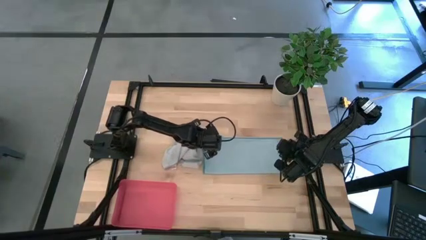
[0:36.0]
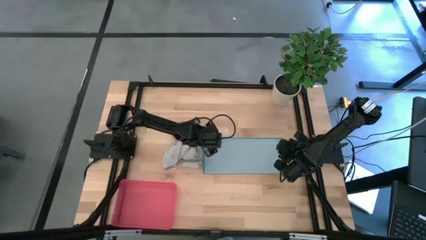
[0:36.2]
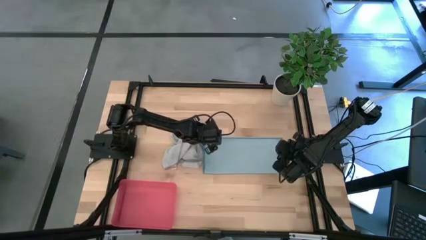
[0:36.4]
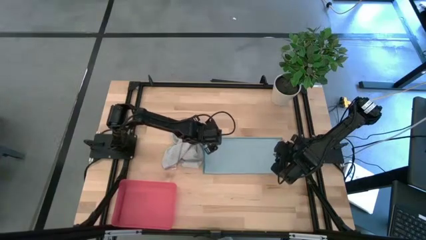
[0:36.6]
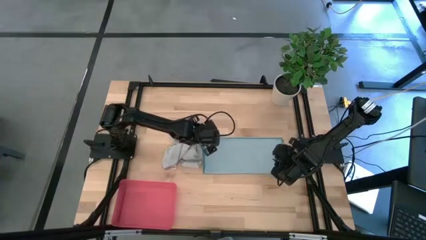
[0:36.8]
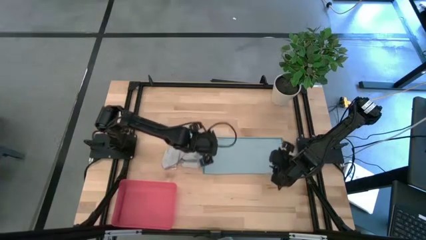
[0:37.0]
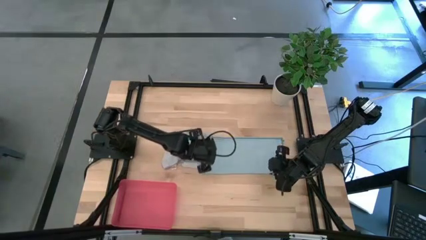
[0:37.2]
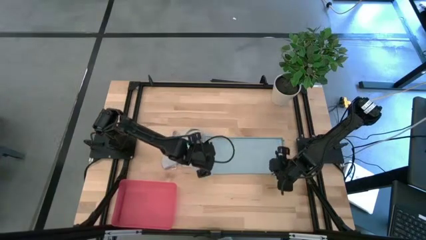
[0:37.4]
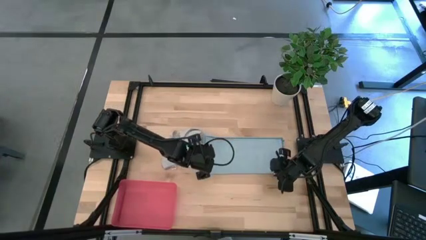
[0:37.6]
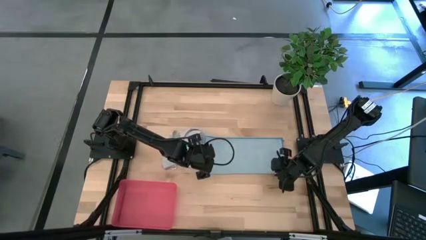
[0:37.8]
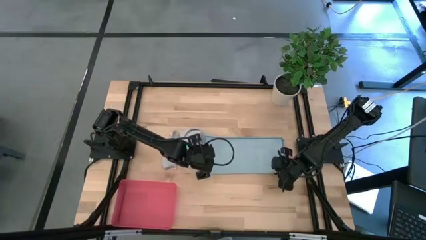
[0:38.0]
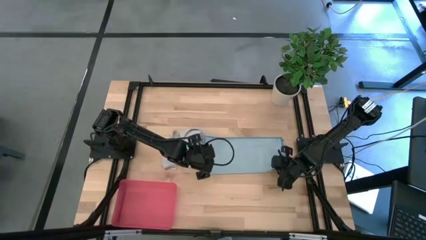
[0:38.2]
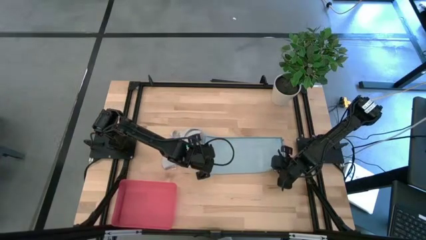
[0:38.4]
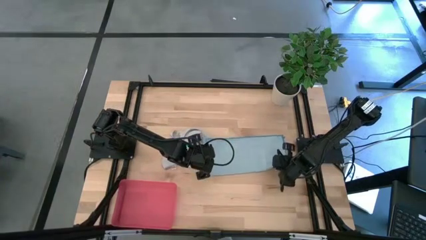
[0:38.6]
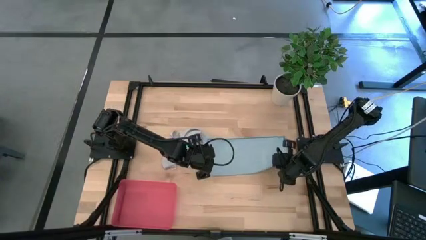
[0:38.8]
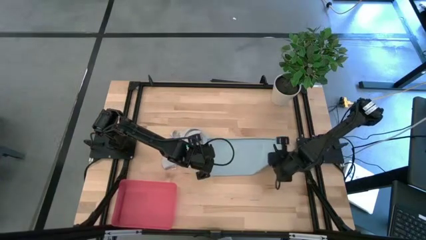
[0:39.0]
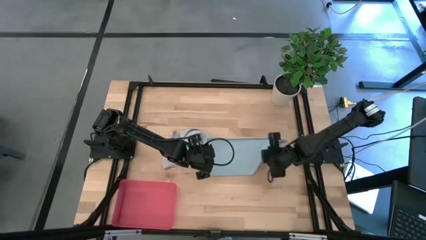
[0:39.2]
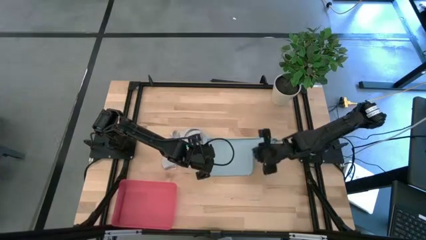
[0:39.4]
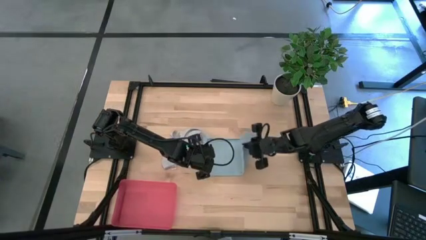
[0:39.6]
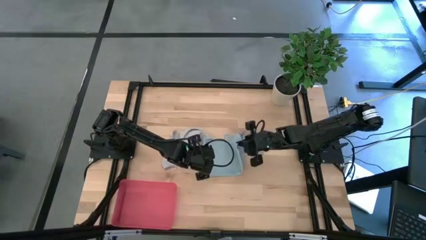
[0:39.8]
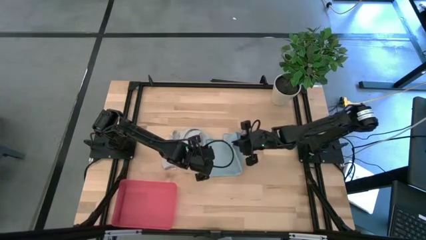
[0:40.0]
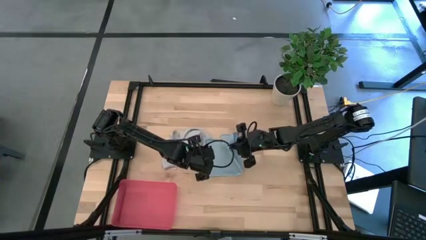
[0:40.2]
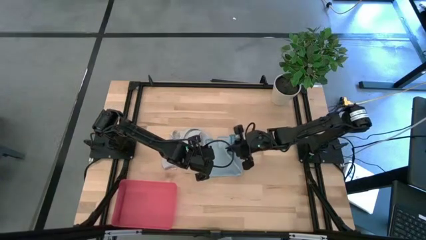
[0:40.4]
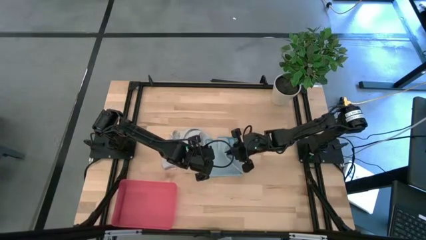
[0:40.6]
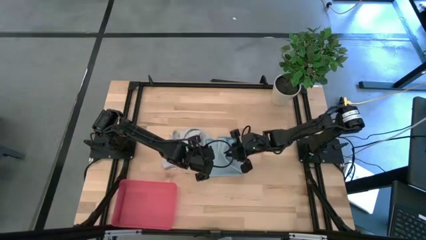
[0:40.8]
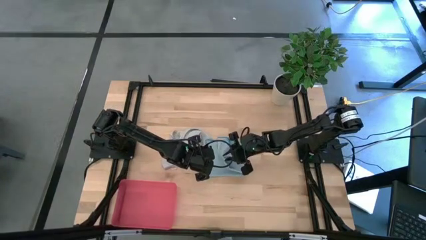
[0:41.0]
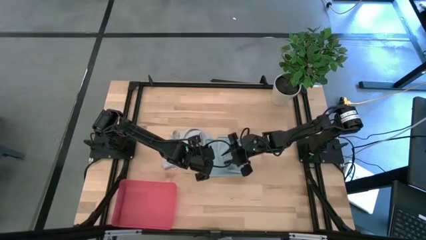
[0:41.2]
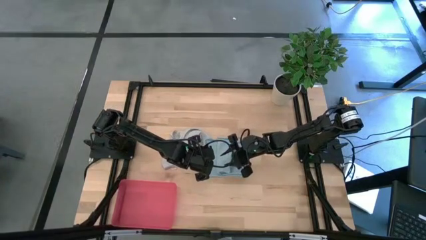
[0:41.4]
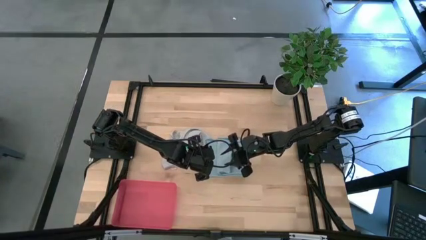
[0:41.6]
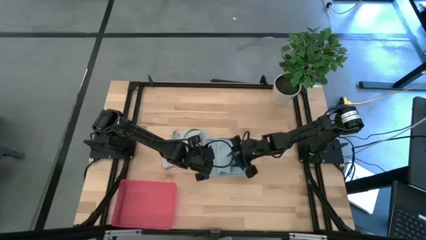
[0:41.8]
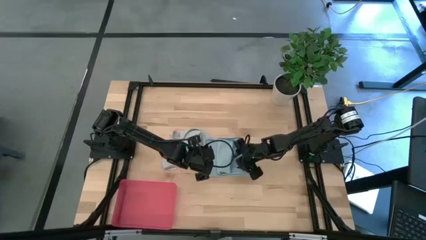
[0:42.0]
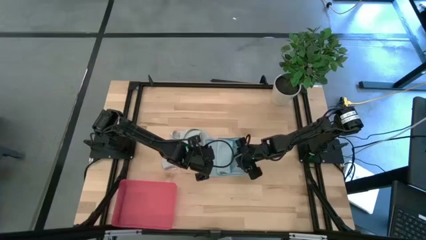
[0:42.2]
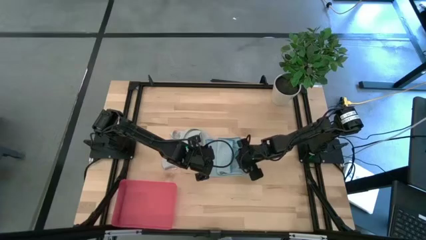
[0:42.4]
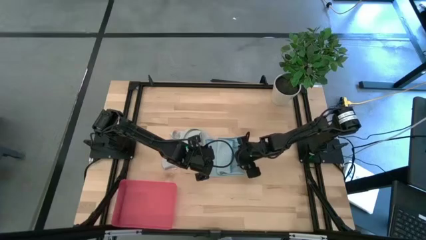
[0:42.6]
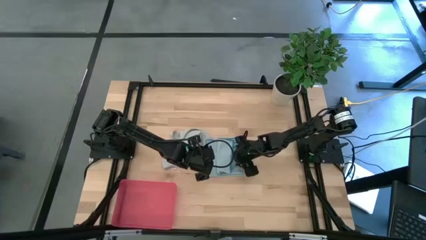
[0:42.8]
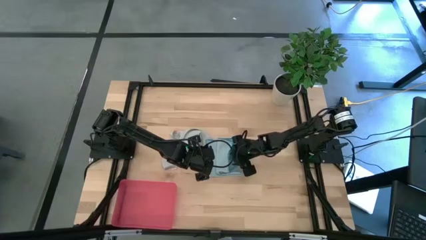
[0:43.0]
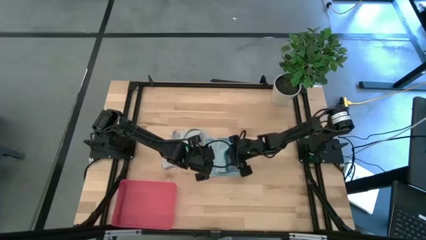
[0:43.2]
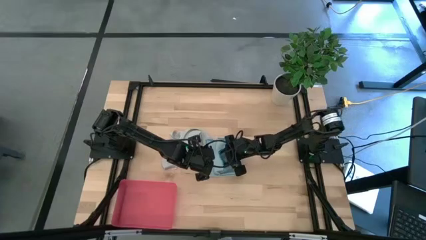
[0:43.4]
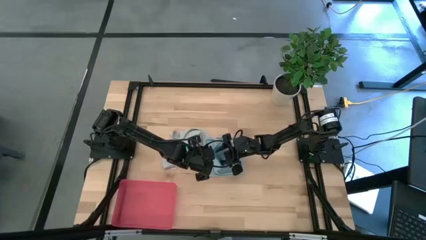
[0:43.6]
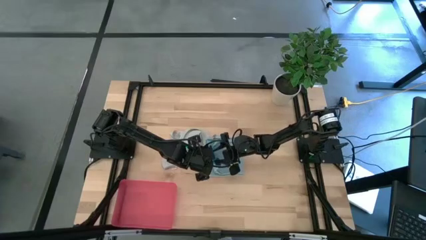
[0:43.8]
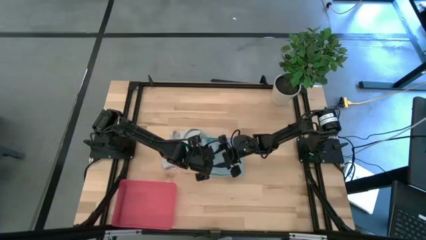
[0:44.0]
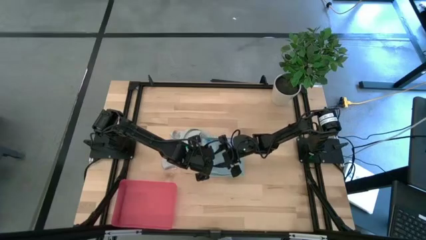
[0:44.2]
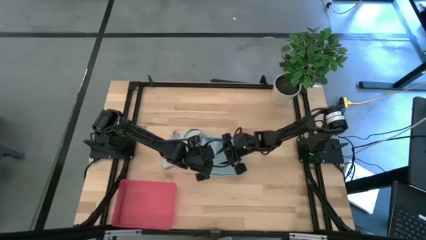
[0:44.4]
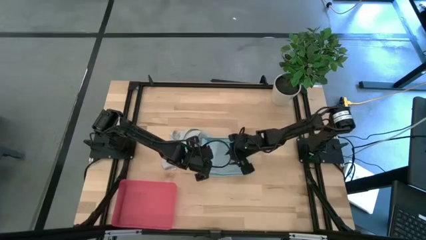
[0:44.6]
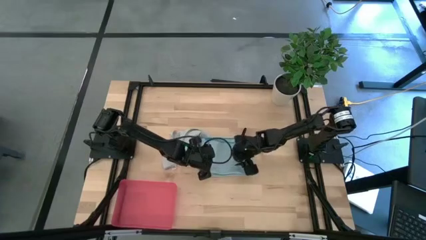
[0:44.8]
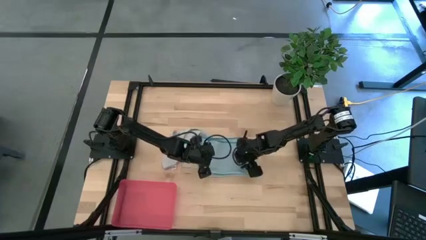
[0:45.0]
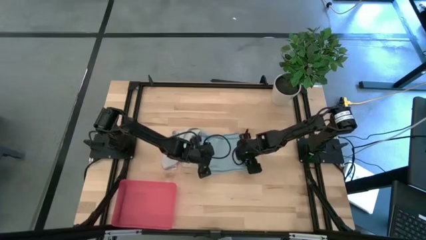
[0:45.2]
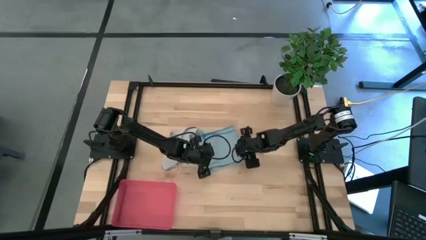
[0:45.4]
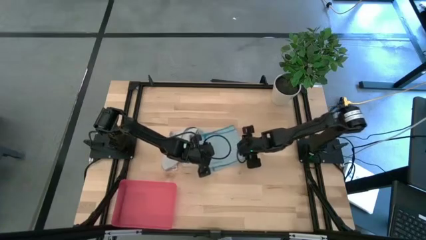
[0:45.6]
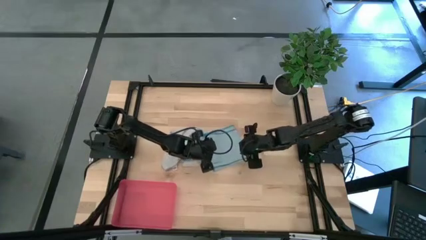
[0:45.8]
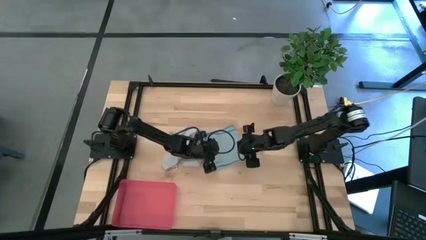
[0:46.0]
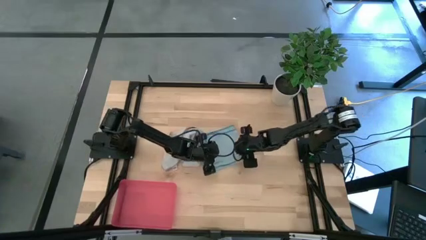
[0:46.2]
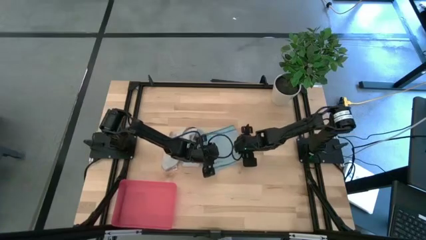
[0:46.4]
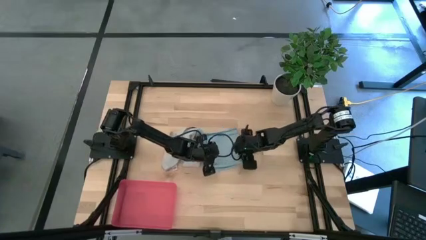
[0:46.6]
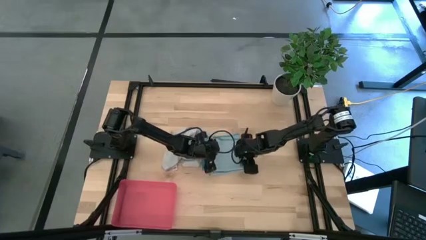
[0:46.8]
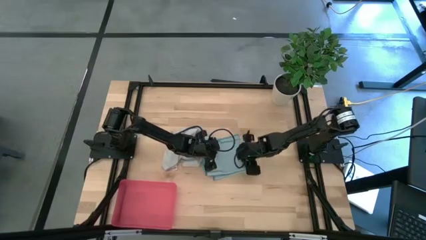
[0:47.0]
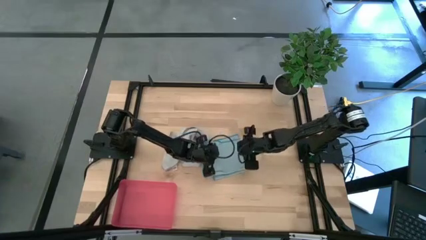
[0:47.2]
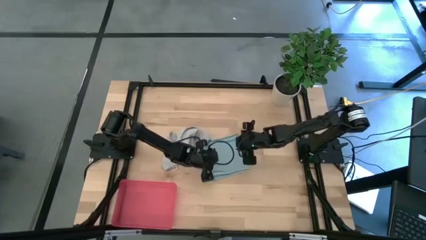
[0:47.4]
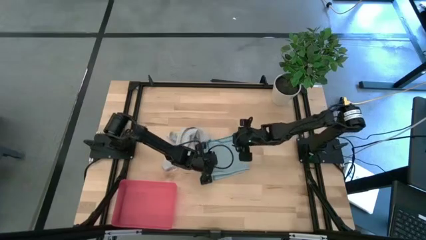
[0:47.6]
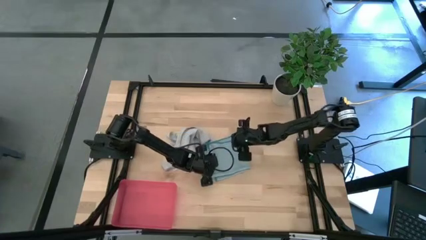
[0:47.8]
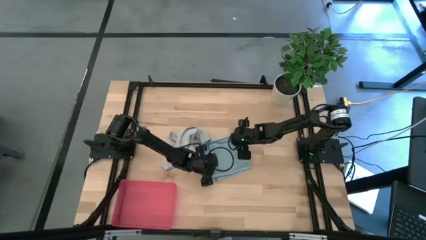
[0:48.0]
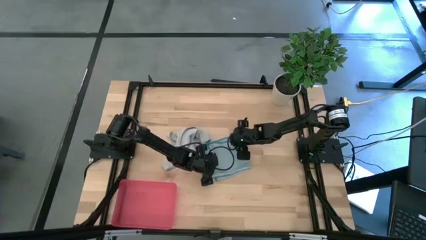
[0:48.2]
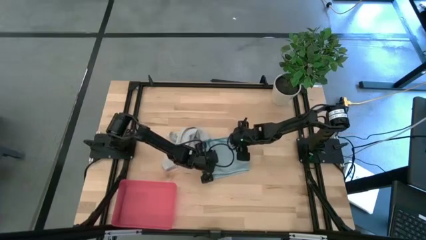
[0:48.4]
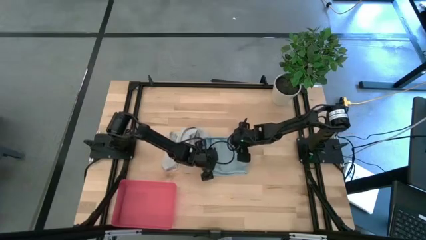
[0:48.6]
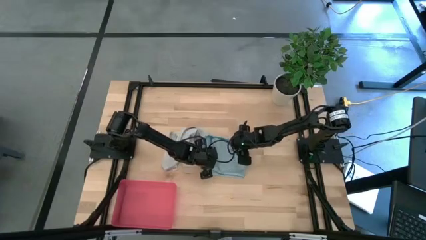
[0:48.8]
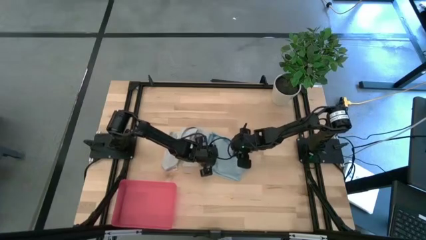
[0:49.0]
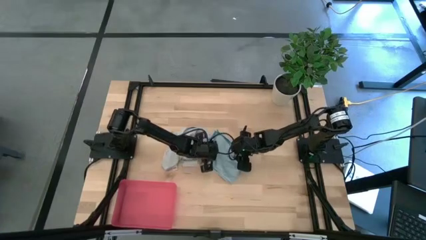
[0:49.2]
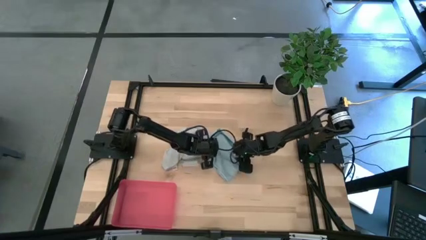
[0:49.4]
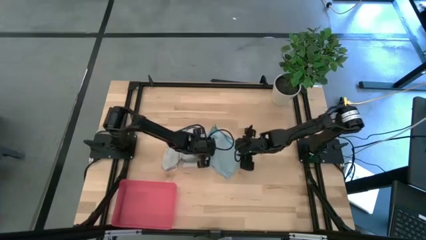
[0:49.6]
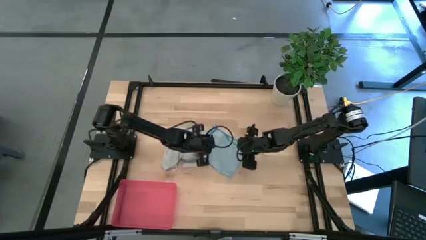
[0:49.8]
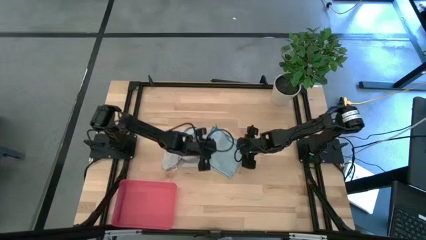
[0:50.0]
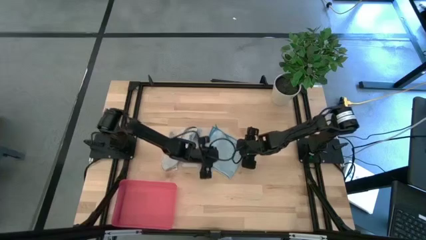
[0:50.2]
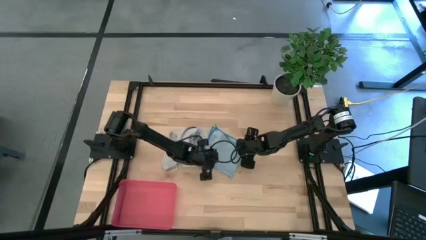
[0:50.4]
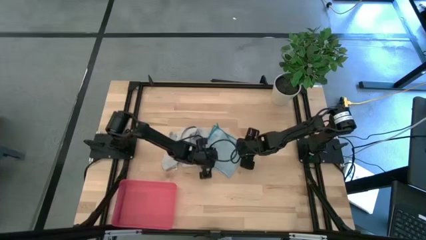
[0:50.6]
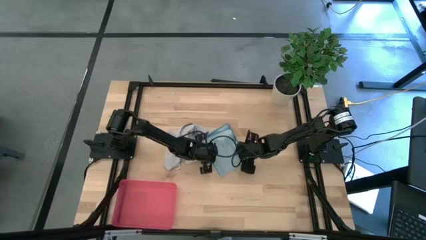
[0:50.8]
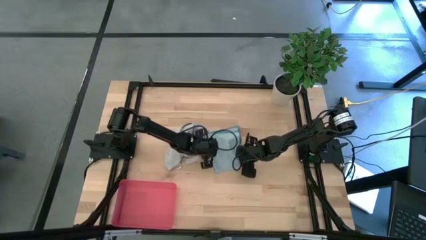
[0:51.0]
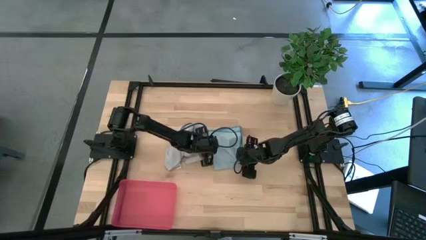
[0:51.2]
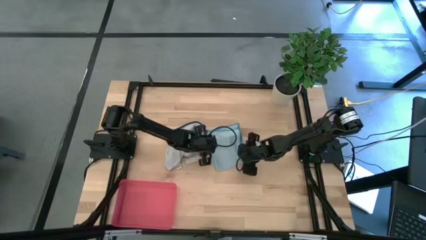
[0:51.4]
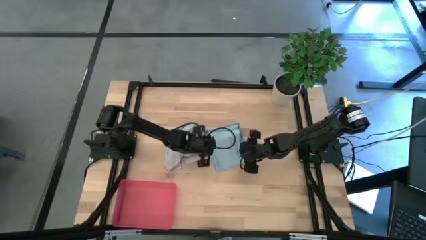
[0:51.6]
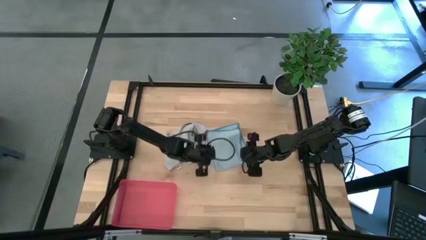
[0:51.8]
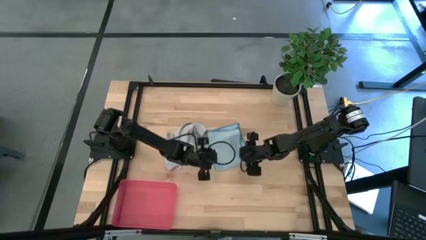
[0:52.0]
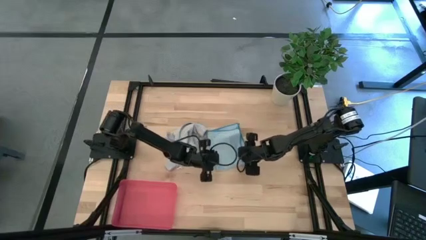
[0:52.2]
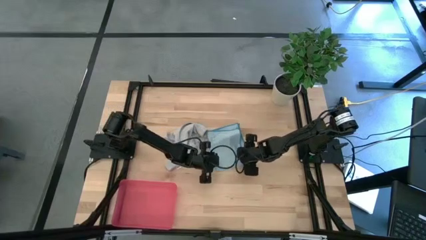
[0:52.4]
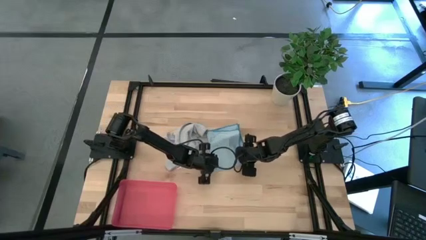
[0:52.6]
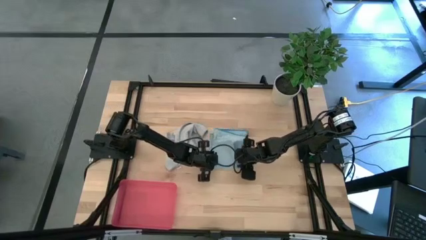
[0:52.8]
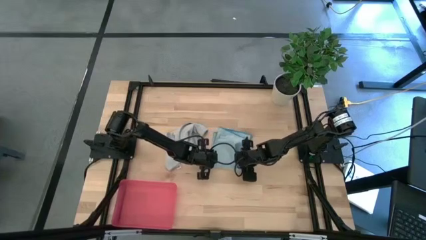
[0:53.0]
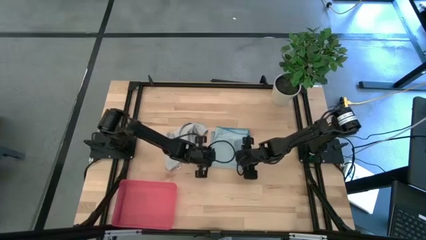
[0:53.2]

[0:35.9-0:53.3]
Task: Roll microfiber towels into tight, uniform cylinder then place into a basket
Fold the blue towel
